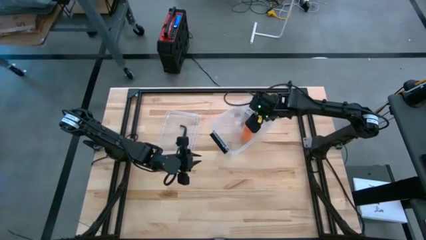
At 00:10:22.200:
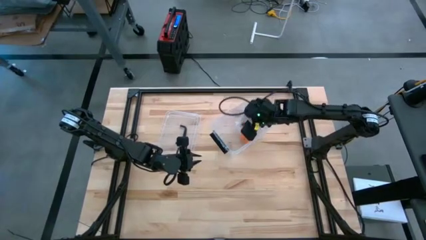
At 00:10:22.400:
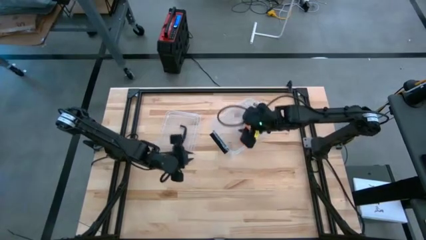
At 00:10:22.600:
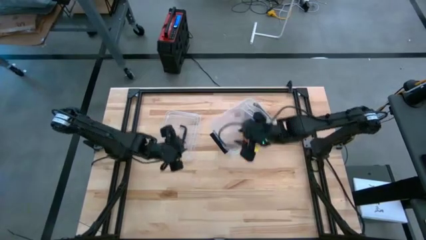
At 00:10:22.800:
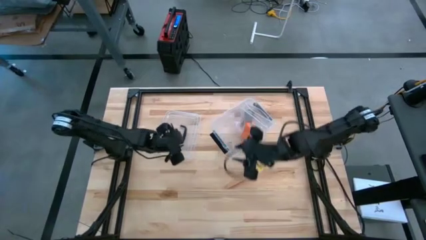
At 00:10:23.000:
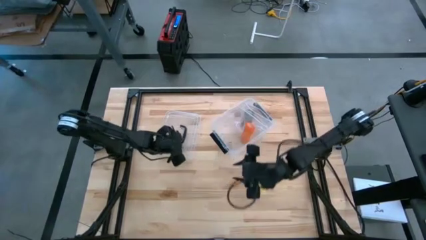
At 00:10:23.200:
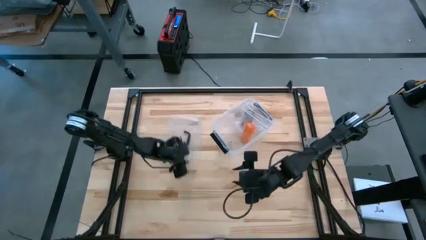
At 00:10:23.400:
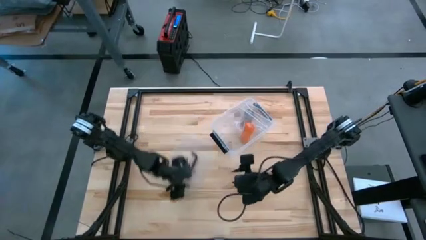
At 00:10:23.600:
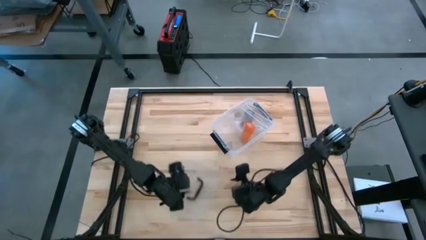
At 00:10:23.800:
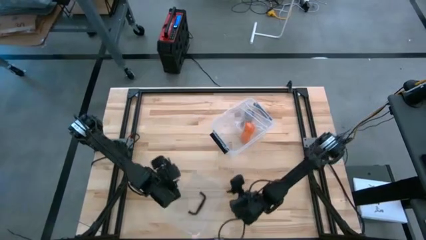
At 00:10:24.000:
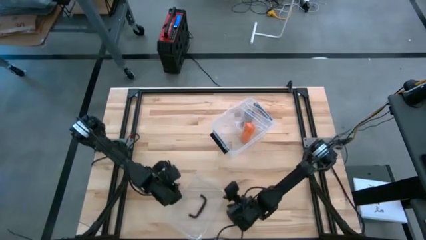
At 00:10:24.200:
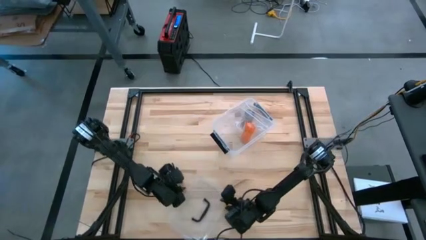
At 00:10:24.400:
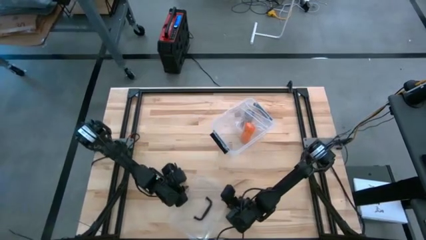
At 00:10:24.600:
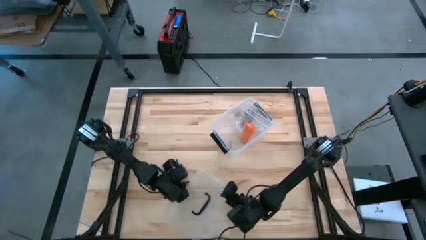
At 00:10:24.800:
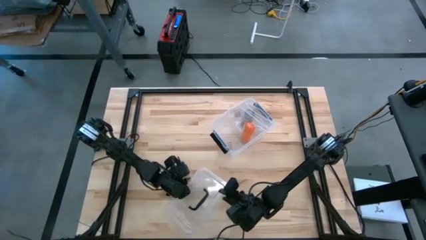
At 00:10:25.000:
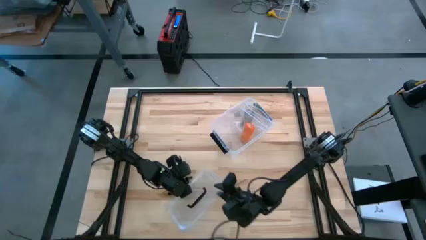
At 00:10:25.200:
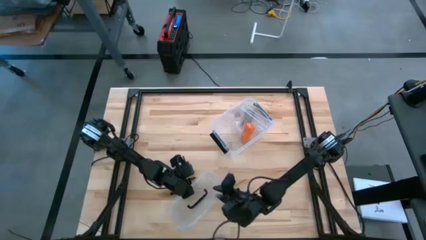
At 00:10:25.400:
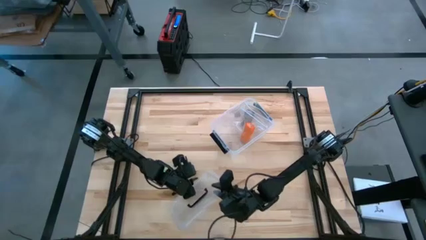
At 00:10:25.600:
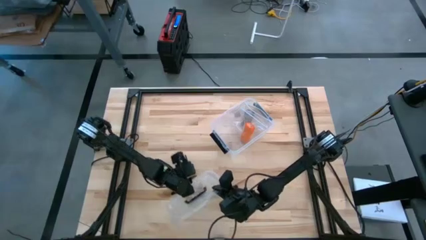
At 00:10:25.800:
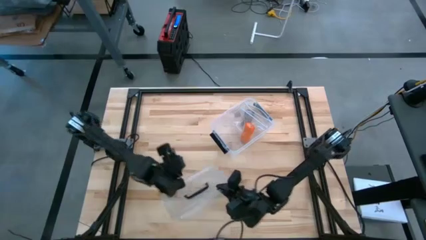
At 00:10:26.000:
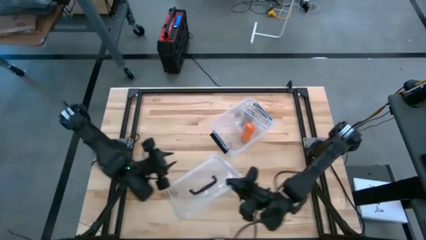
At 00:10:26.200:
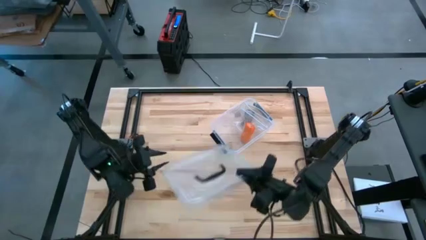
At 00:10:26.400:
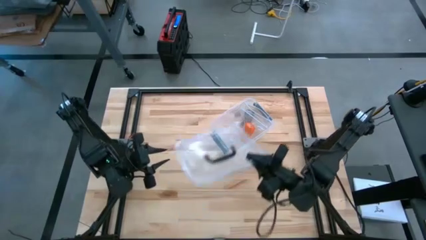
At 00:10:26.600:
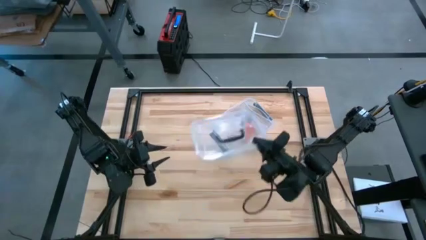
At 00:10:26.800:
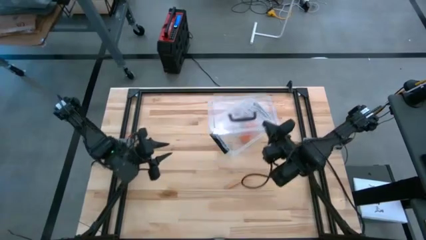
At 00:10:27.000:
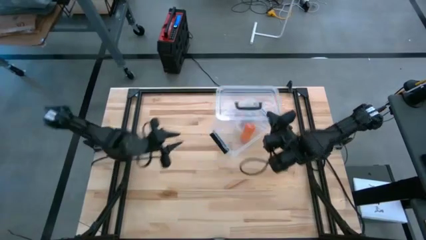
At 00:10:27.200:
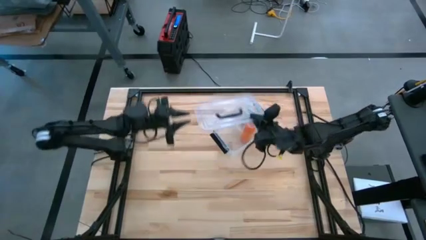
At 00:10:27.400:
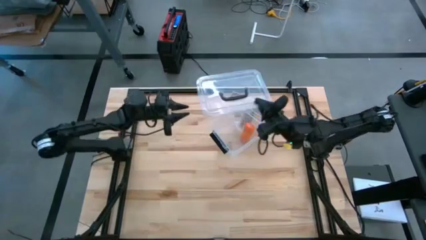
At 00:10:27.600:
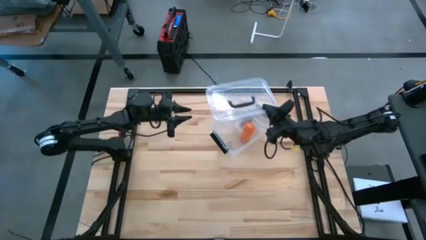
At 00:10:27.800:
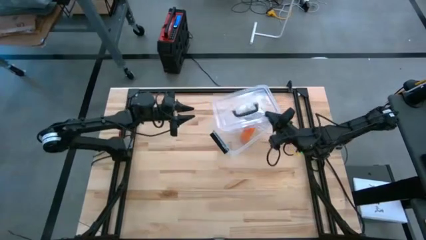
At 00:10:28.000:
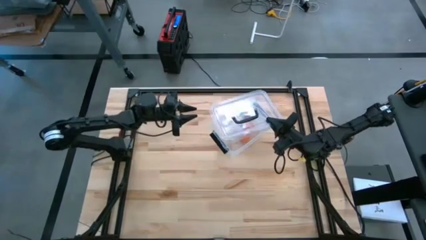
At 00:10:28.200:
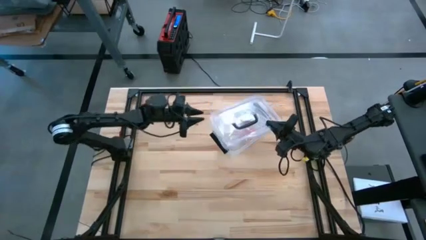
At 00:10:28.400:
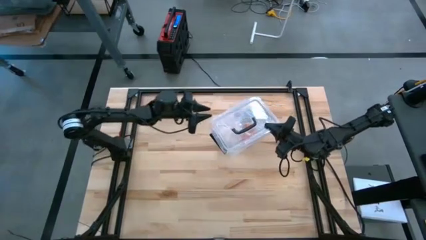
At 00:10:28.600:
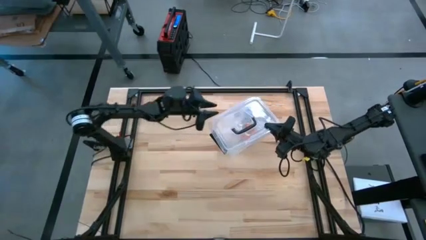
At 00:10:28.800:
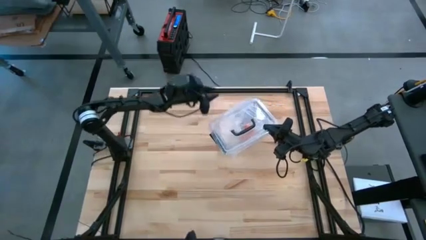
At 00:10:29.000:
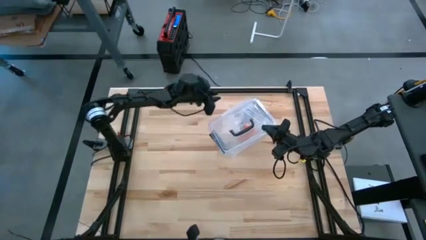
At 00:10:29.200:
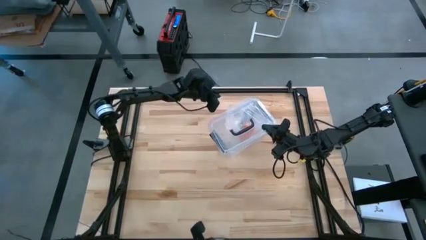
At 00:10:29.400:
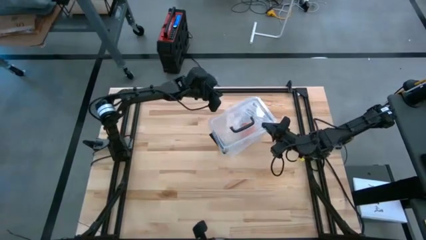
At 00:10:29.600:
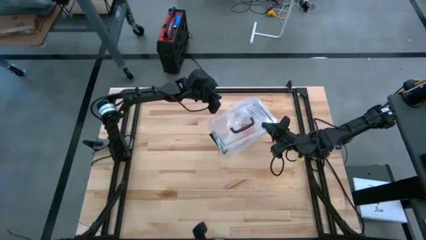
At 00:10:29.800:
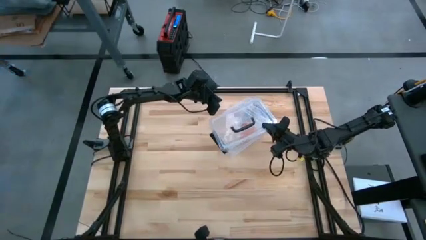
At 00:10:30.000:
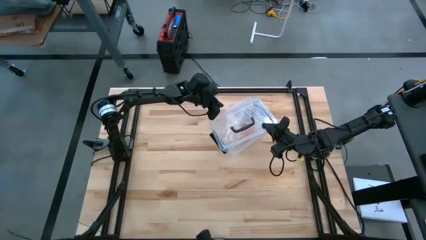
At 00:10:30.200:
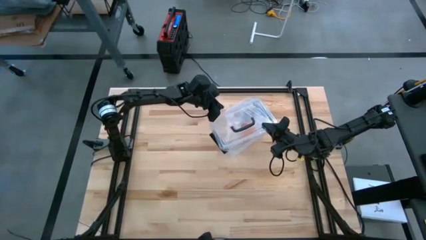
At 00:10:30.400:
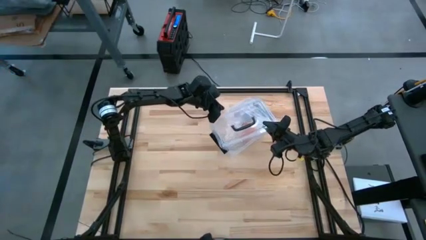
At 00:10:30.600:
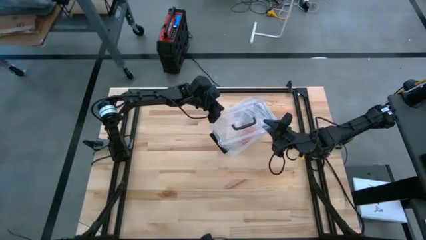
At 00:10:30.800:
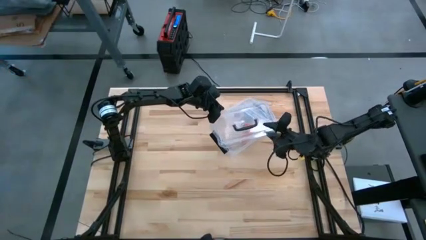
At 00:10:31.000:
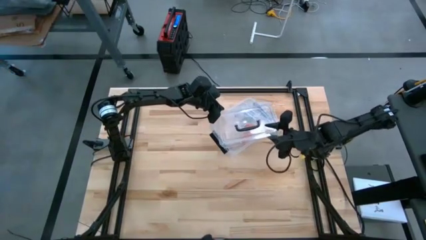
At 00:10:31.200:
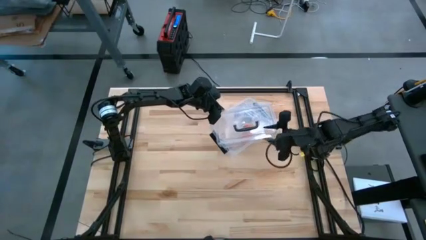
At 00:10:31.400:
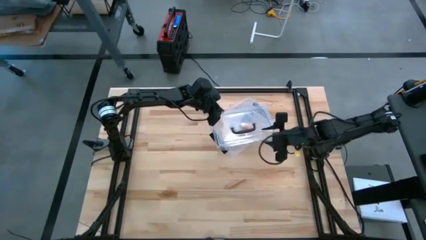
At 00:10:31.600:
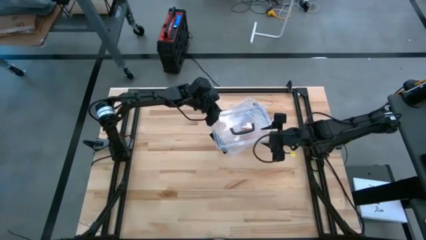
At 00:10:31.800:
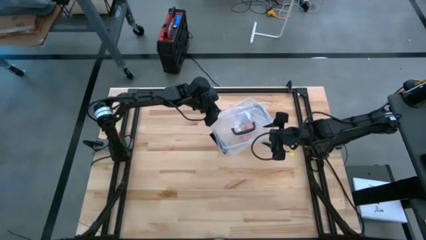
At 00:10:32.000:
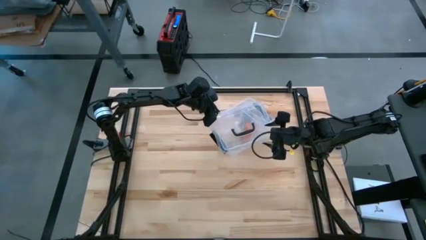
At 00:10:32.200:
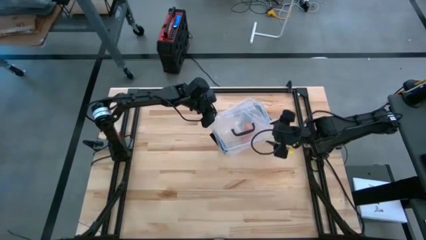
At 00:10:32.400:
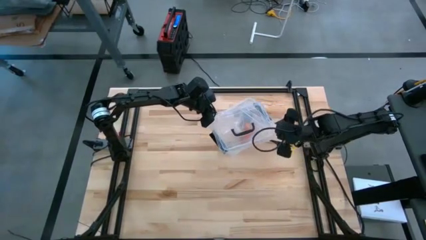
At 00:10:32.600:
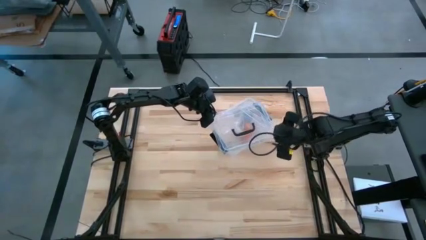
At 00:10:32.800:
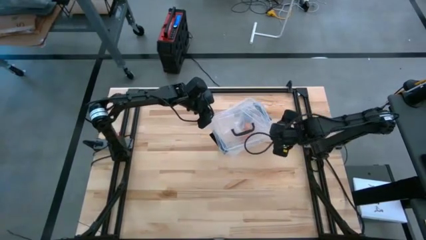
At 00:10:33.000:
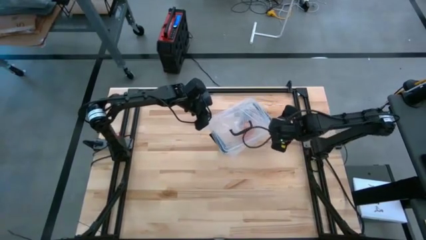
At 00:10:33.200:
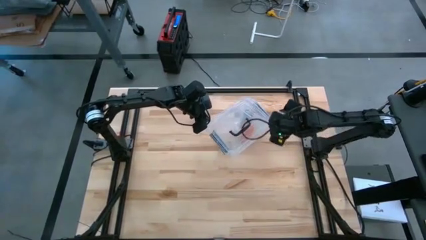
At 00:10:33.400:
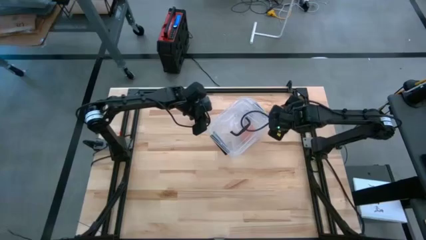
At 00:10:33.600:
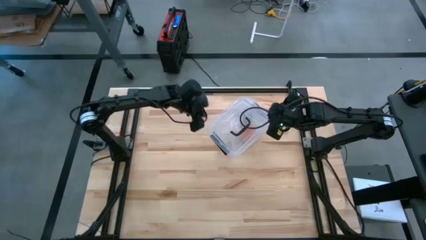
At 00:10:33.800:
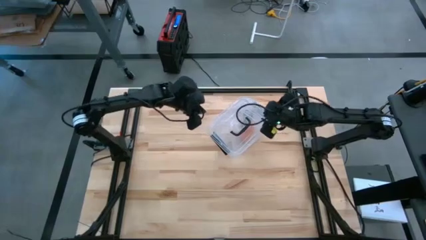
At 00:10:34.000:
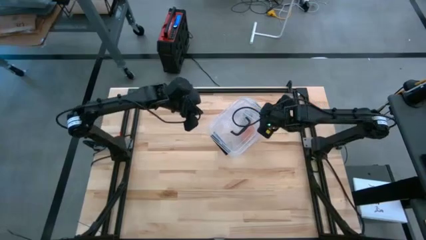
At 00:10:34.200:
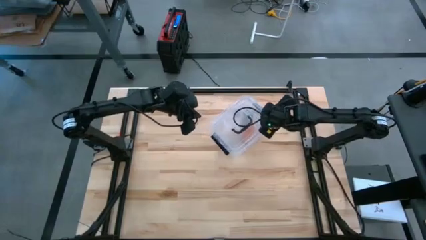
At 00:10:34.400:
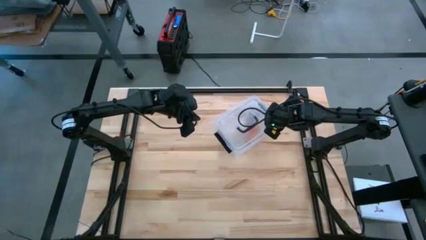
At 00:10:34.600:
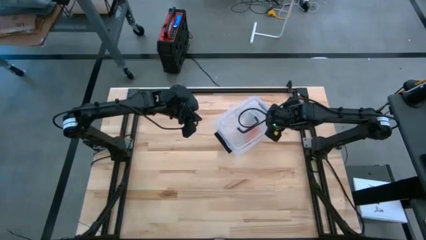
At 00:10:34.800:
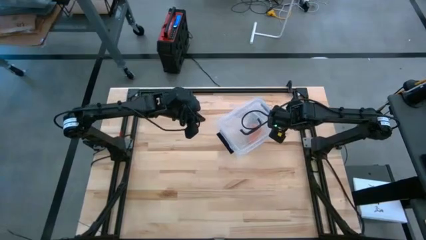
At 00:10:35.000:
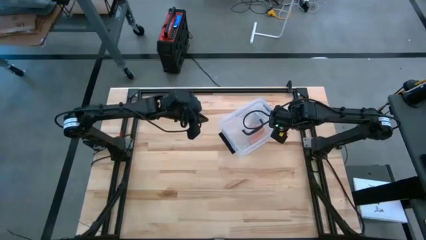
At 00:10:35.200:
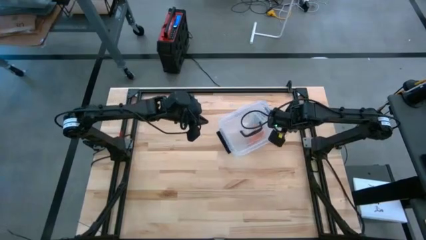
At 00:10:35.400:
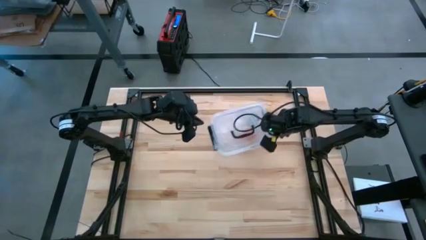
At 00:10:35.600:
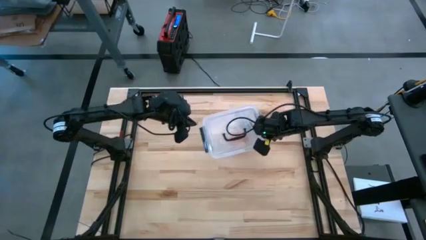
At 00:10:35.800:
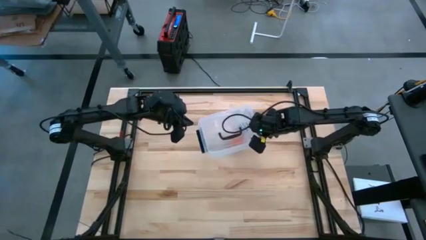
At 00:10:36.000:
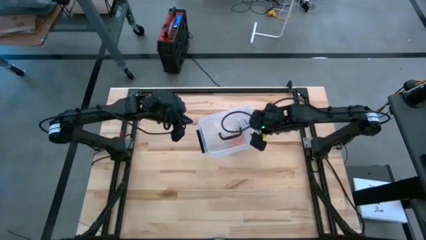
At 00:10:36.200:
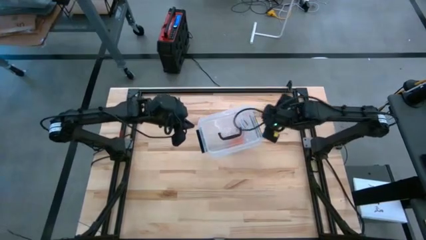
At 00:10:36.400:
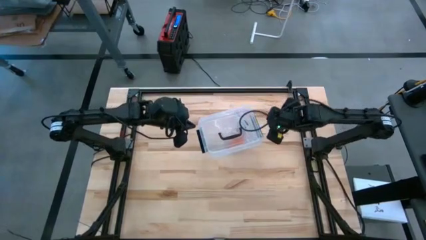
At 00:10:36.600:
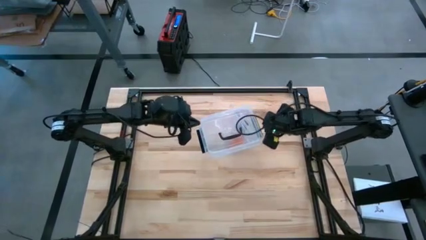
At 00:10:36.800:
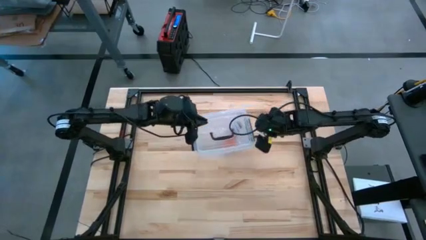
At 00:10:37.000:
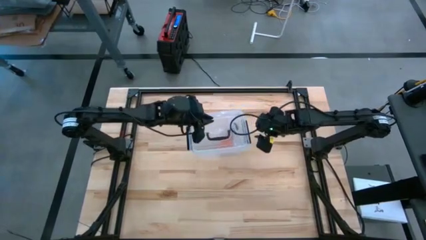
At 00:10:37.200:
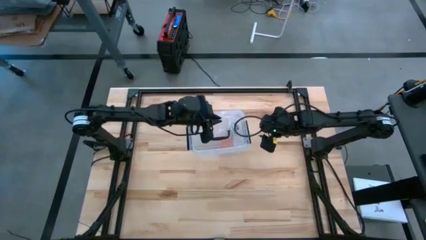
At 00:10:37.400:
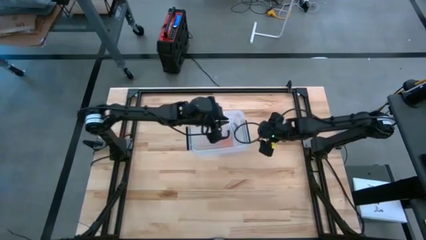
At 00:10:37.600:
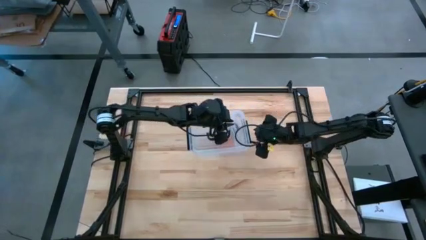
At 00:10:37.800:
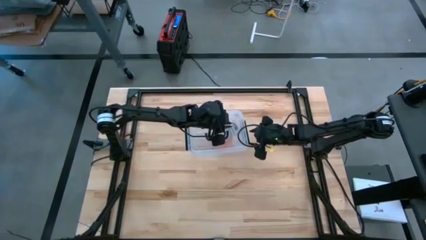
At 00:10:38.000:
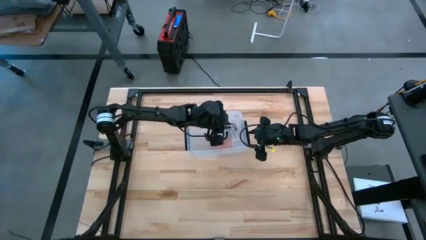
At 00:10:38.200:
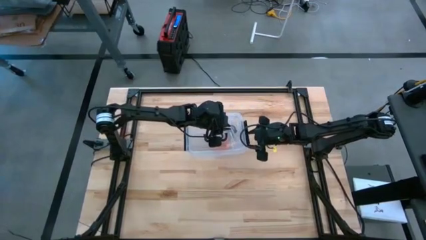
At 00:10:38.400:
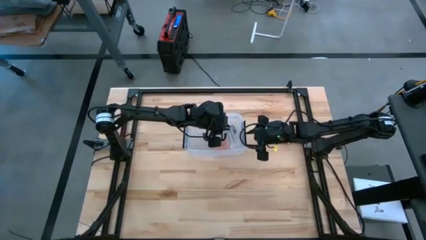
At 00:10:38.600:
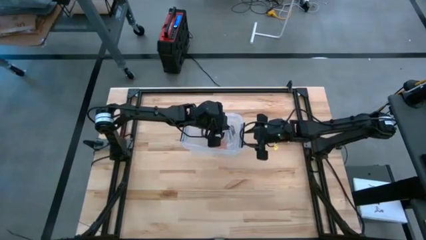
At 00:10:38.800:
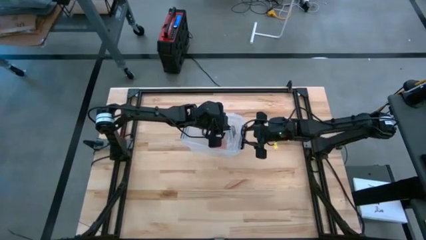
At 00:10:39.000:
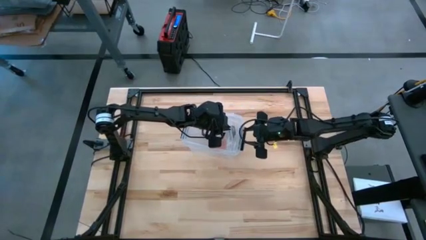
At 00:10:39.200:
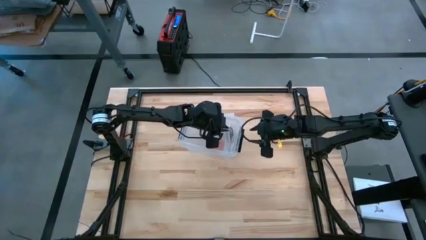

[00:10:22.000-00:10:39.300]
Task: Roll bandage
Close the transparent bin
